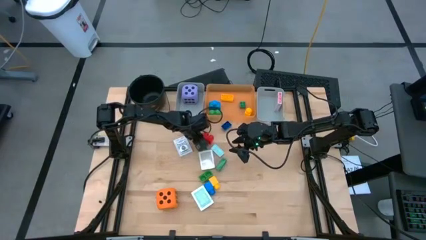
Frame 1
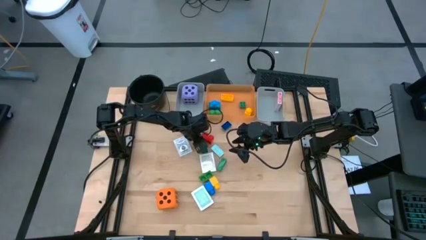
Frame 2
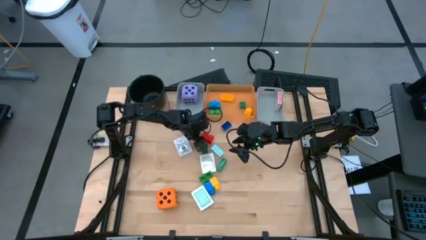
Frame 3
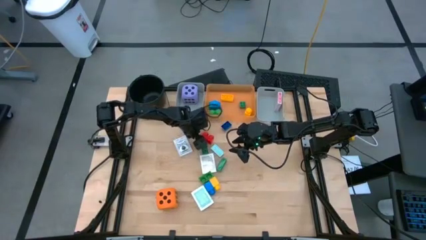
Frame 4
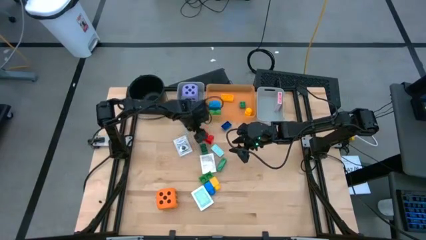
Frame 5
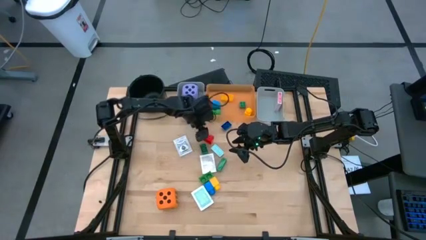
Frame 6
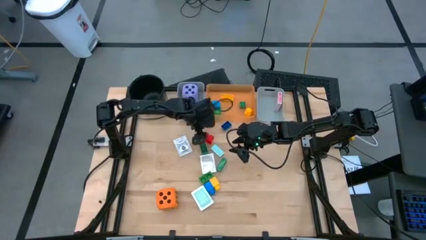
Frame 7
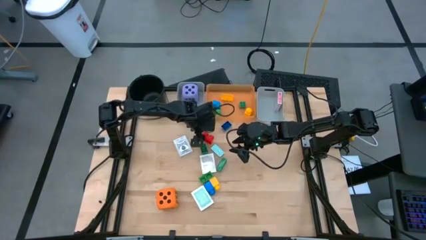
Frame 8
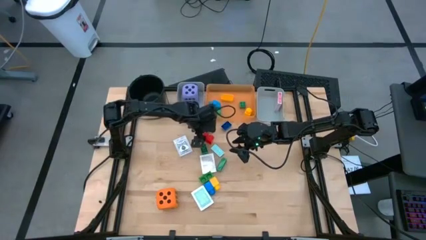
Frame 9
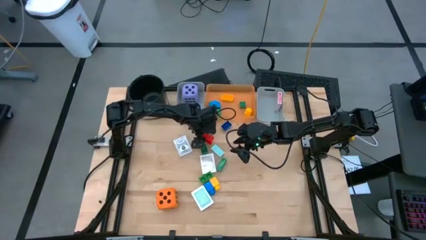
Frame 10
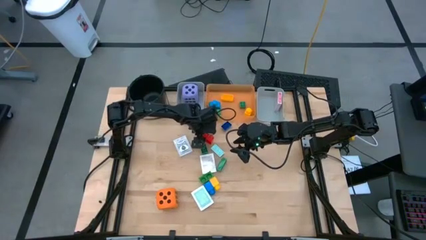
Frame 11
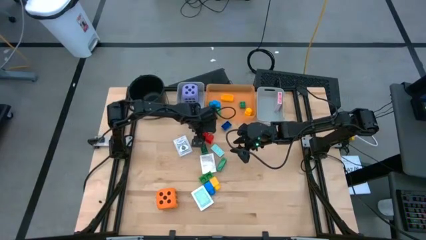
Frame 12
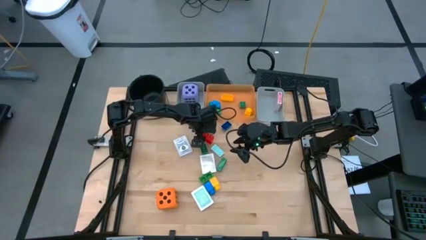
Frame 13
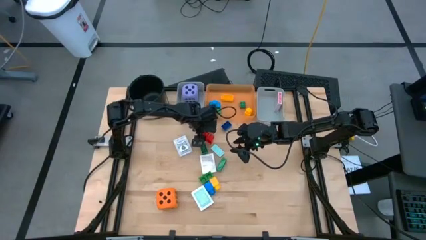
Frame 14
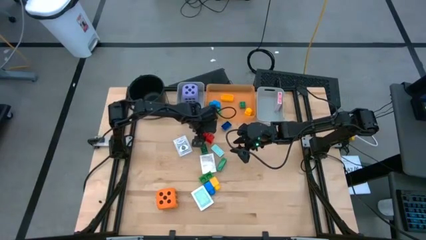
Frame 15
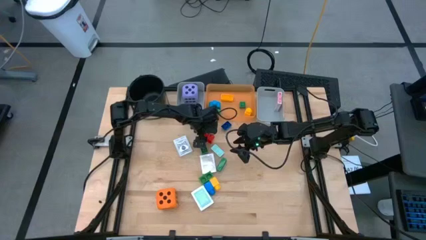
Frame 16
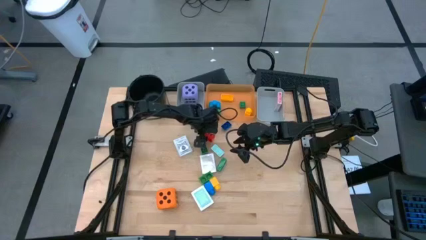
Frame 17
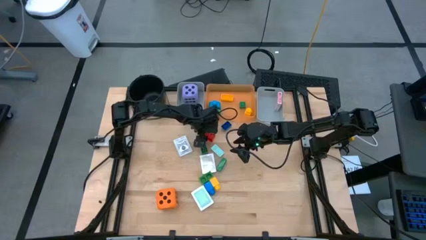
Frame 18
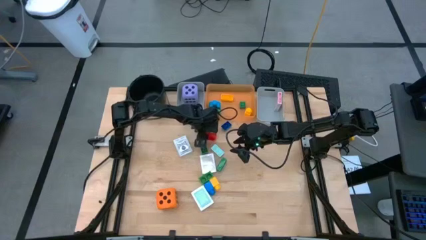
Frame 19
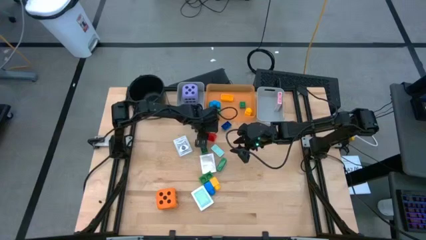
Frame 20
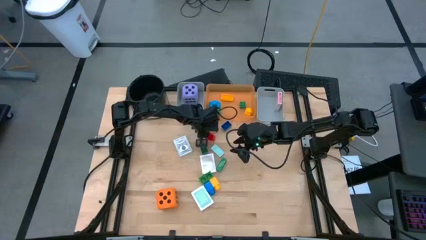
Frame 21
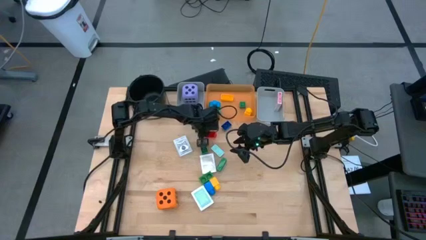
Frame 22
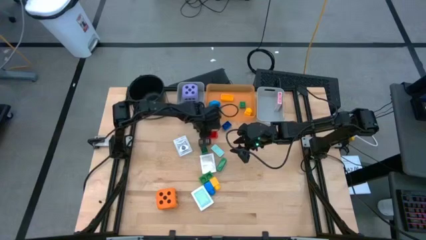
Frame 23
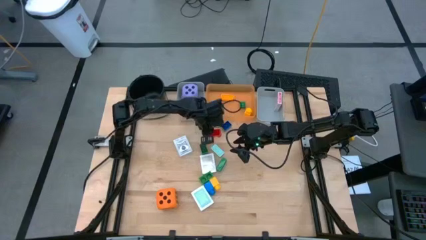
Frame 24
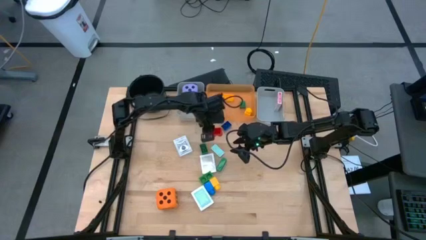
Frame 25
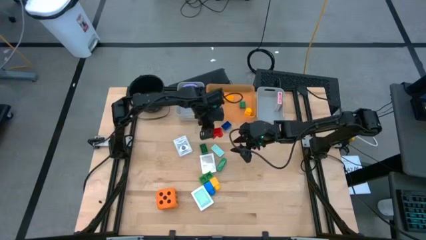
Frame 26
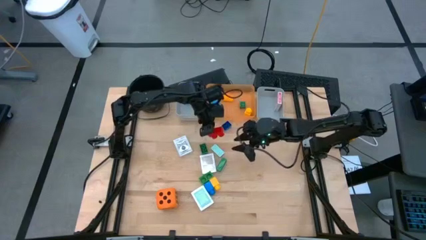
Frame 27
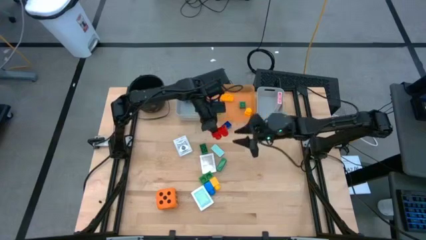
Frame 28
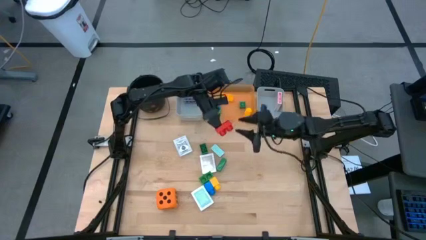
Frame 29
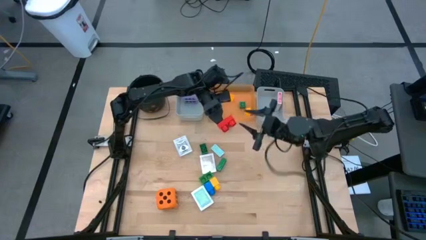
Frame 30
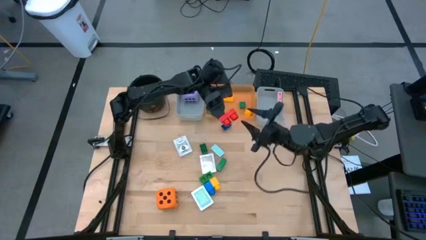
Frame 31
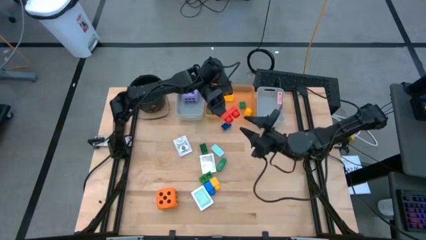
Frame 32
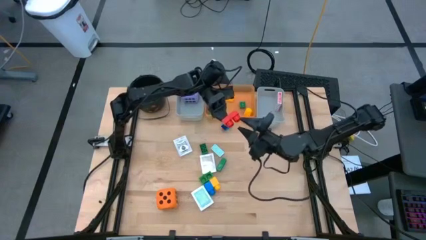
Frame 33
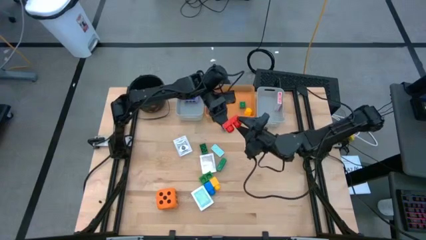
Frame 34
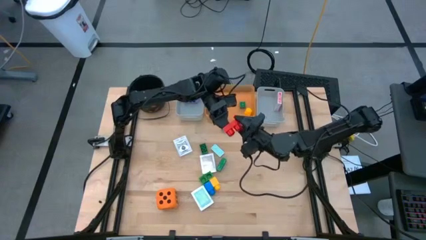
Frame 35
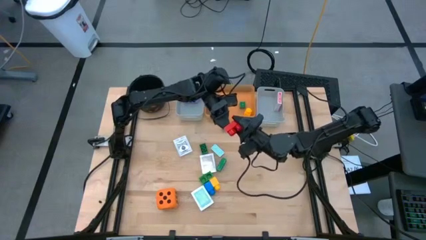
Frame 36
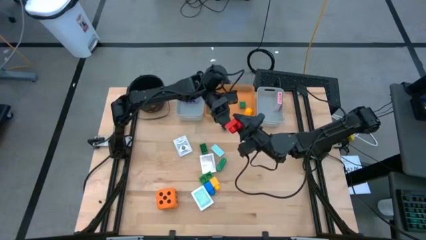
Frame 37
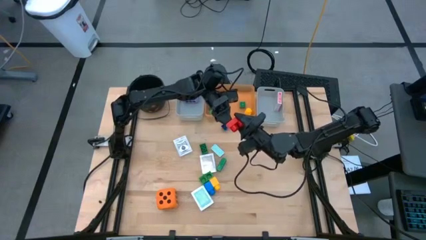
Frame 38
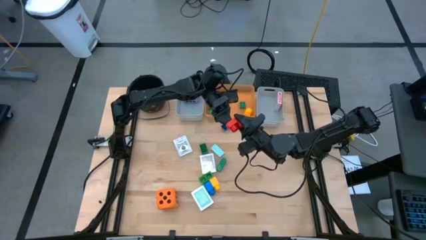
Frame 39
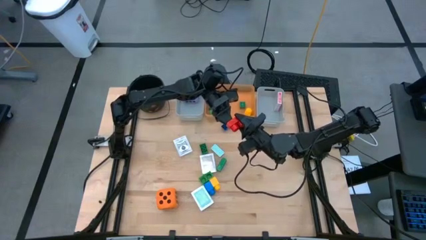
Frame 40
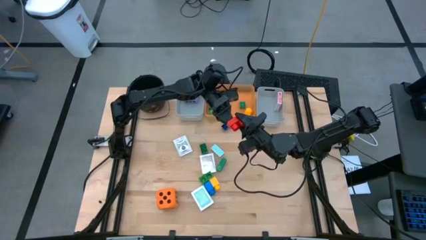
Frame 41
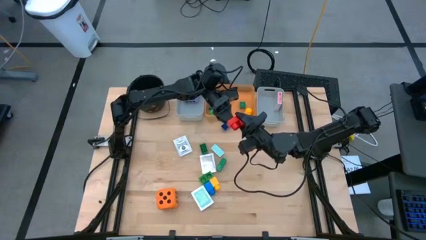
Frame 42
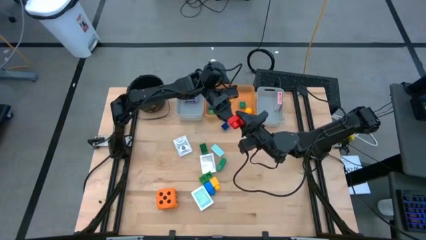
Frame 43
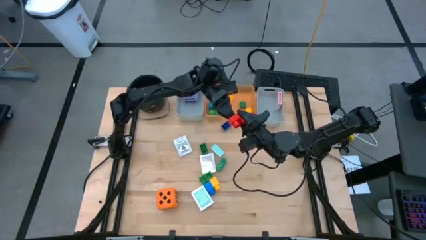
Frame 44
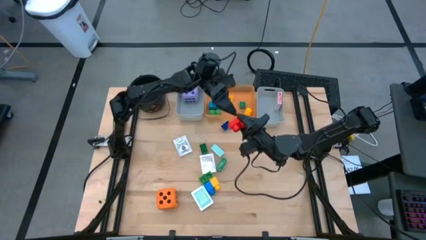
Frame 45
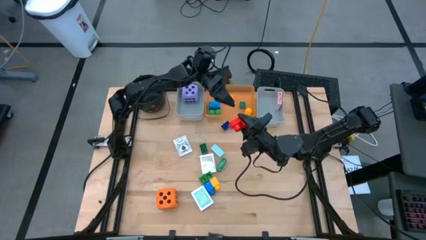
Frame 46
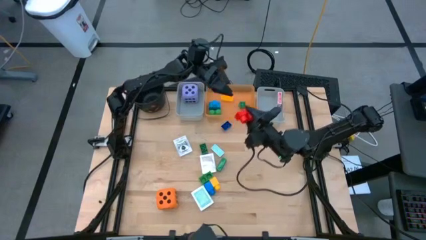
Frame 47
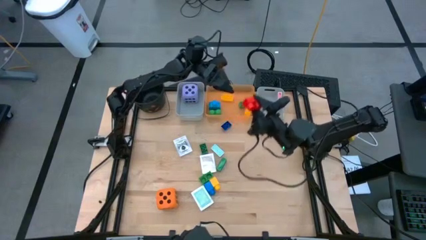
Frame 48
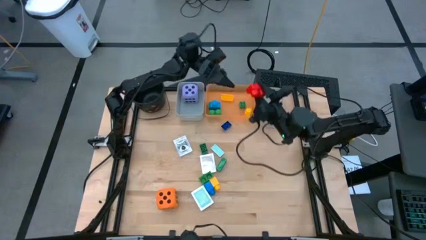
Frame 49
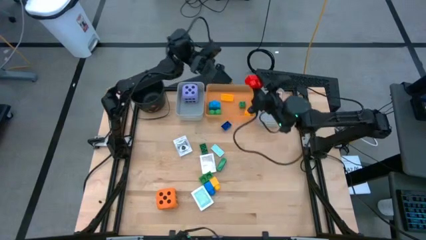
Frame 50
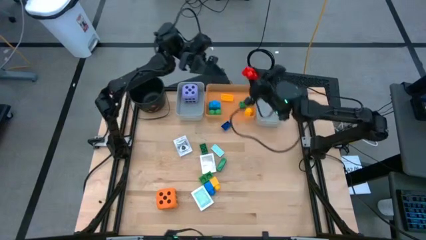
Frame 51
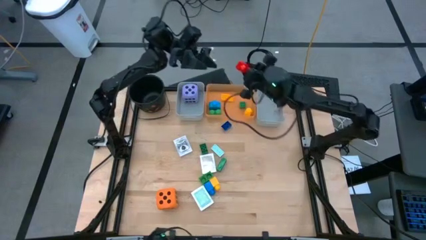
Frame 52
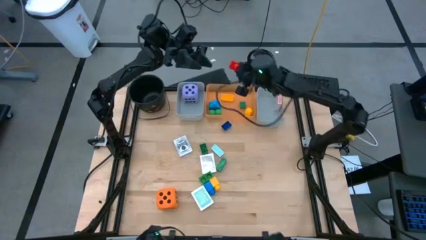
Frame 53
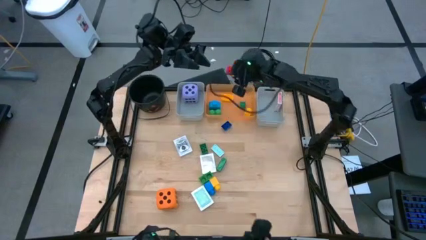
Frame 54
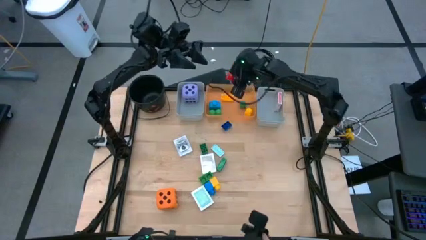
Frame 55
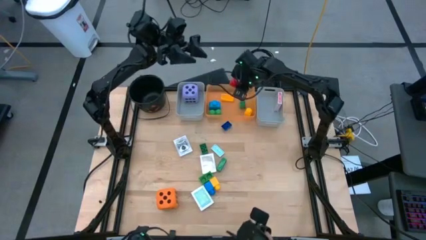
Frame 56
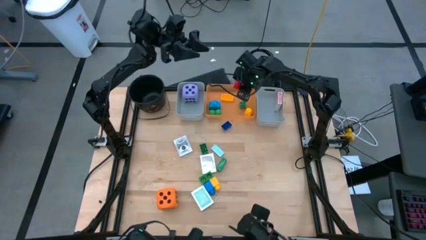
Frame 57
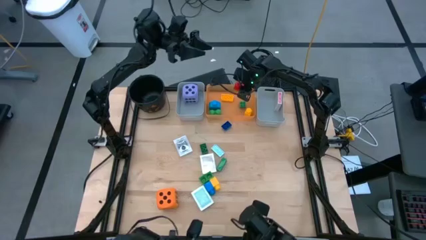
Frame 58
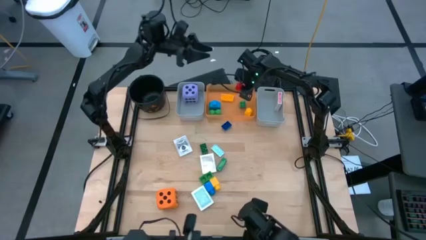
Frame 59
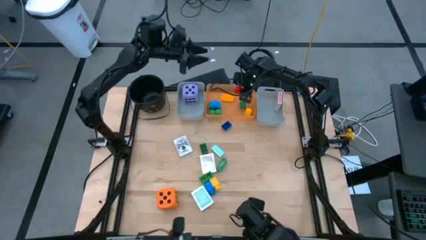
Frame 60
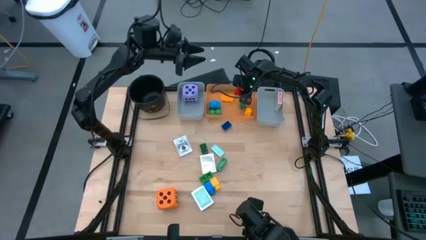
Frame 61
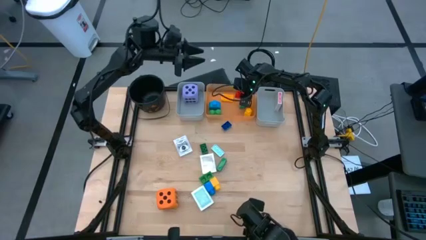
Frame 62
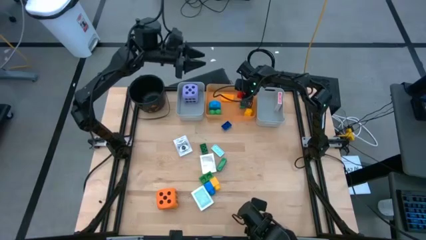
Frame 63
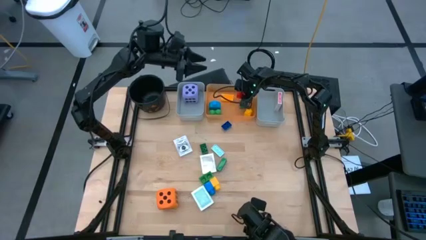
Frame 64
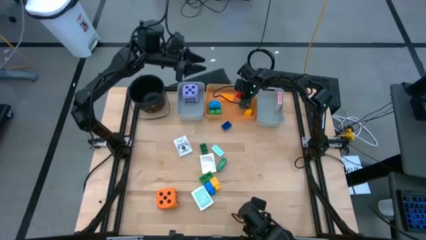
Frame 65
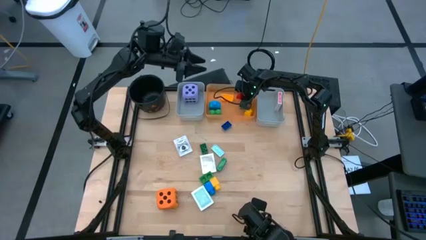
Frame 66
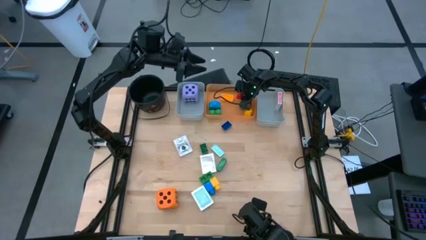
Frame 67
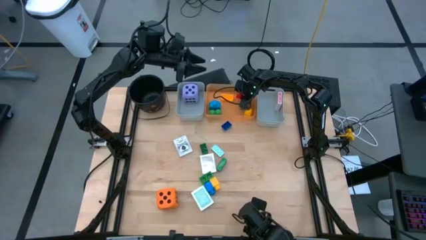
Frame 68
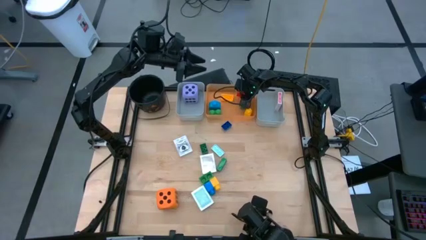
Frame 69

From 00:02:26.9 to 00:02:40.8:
Task: Pick & Place Toys
Put the red game piece into the orange bin

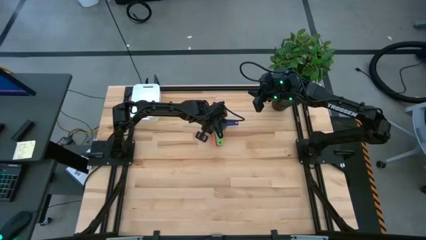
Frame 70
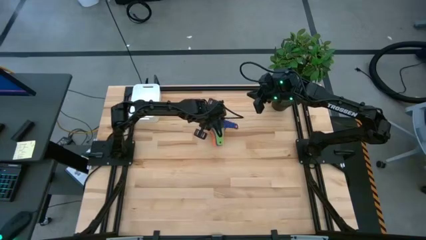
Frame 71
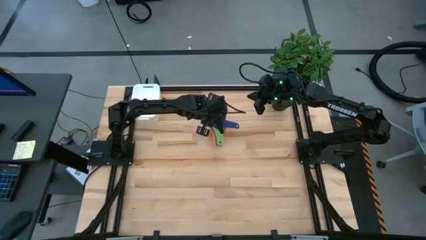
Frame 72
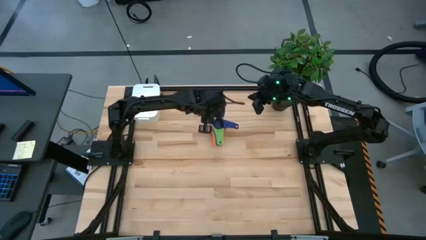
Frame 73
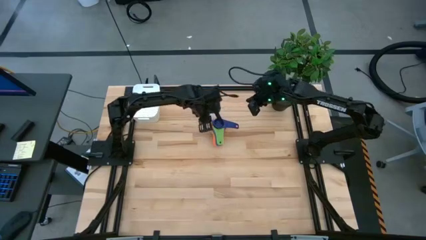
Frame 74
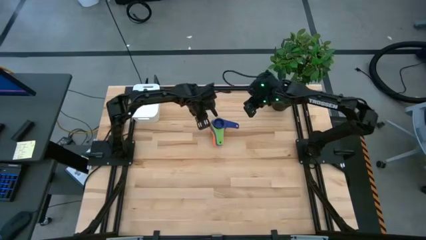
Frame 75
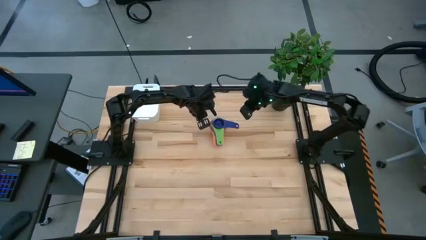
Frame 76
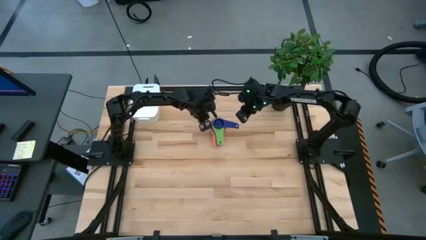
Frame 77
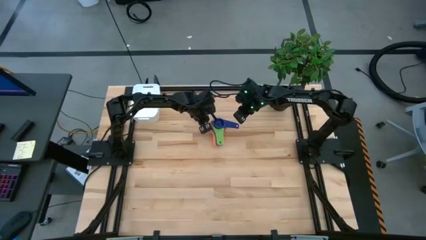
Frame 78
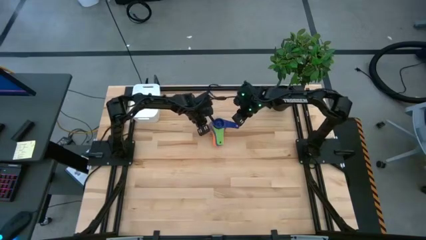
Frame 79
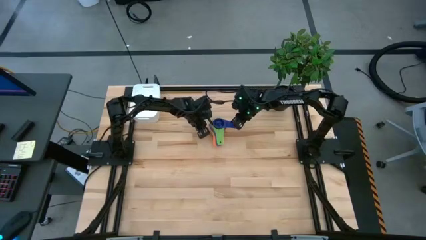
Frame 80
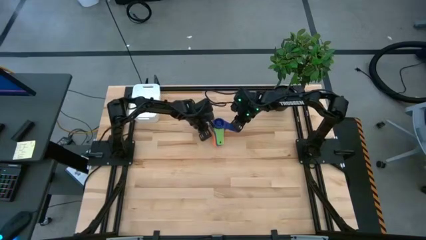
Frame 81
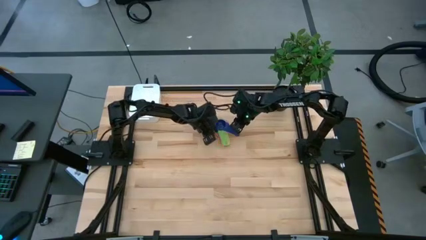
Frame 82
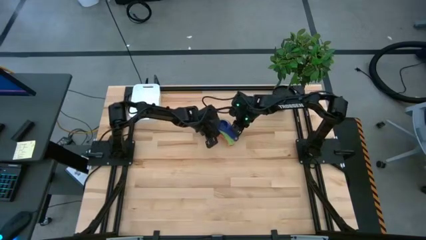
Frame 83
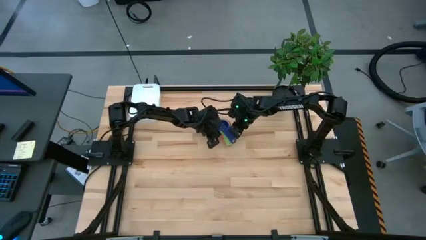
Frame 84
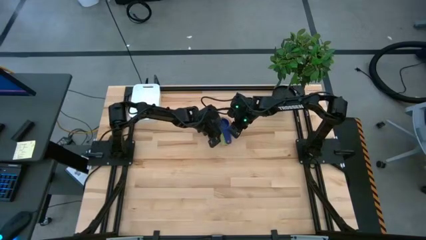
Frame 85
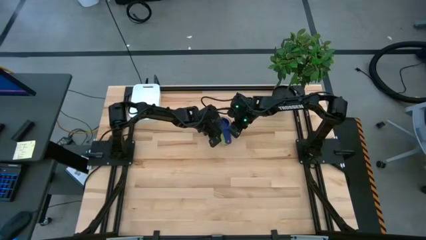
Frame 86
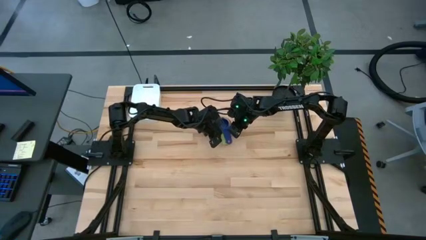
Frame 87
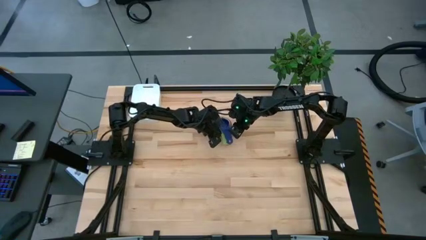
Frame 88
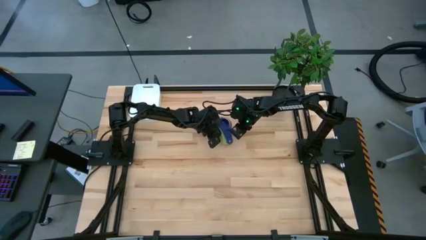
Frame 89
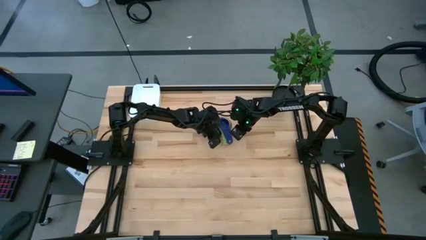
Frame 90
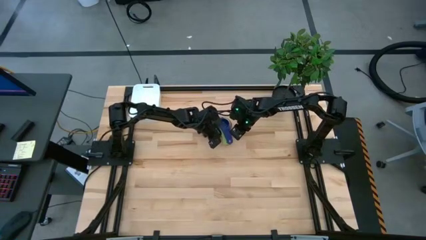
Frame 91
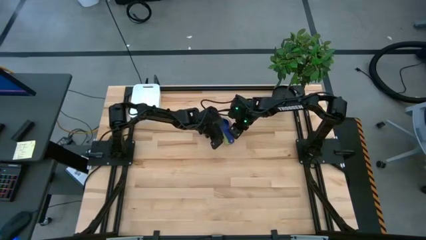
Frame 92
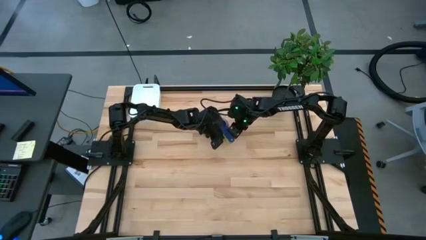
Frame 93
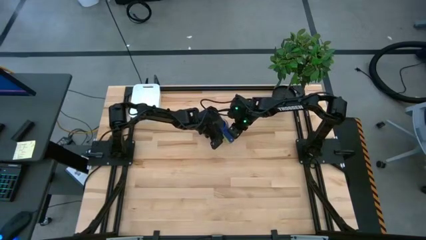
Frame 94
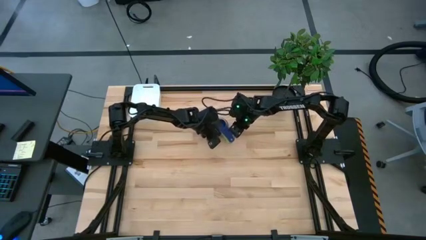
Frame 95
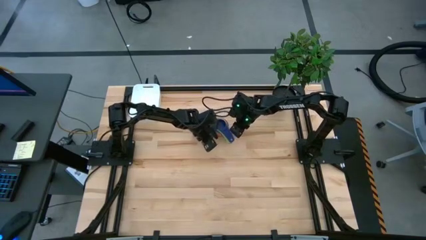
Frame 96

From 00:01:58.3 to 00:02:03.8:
Task: Nest measuring cups in basket
Adjust the measuring cups
